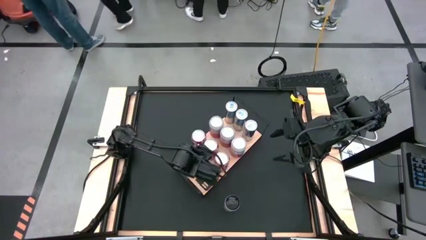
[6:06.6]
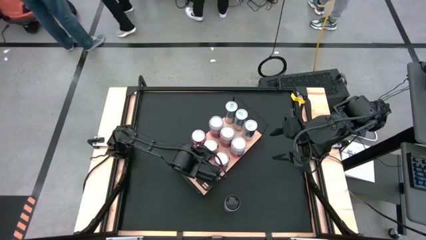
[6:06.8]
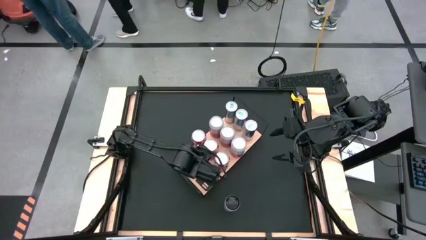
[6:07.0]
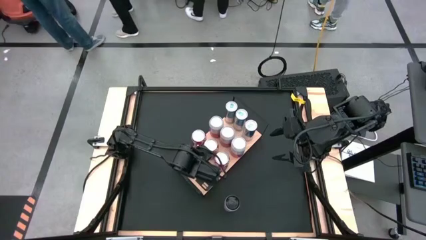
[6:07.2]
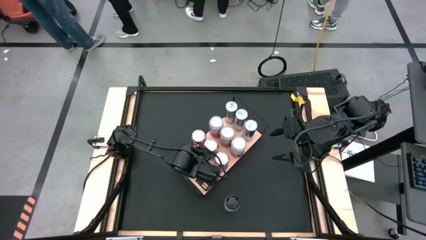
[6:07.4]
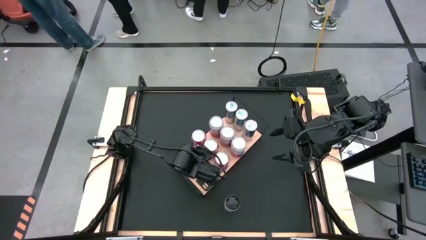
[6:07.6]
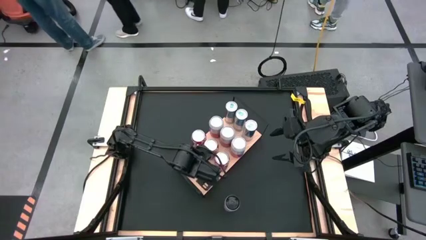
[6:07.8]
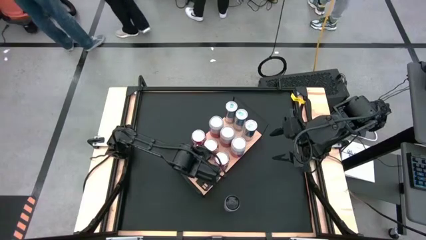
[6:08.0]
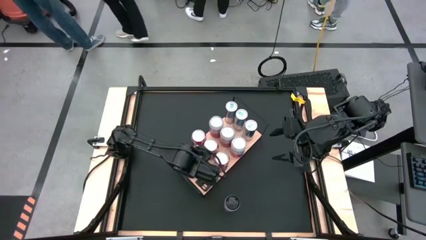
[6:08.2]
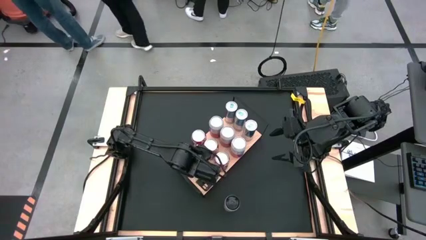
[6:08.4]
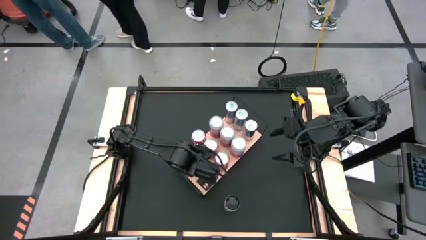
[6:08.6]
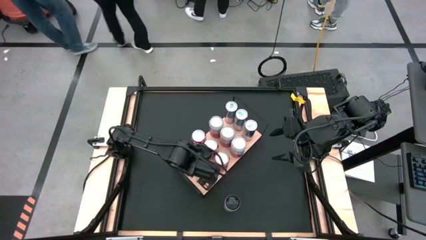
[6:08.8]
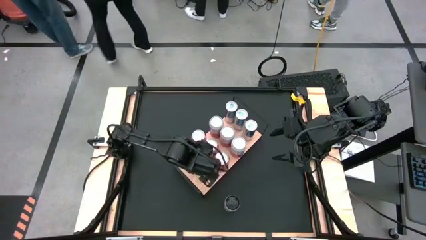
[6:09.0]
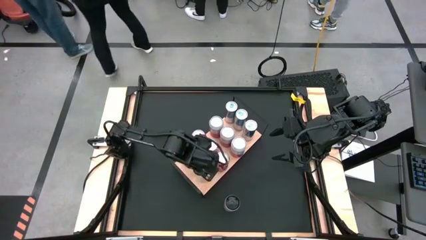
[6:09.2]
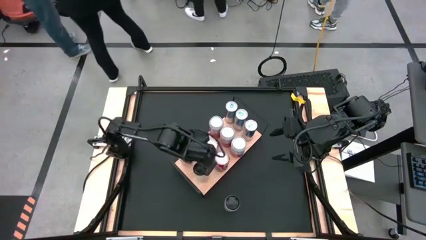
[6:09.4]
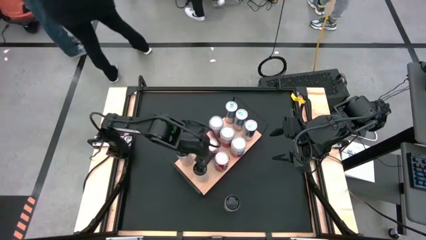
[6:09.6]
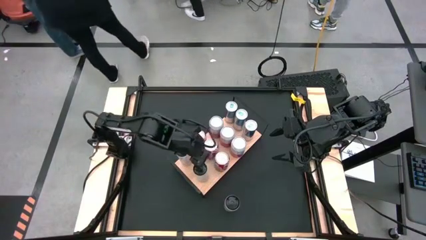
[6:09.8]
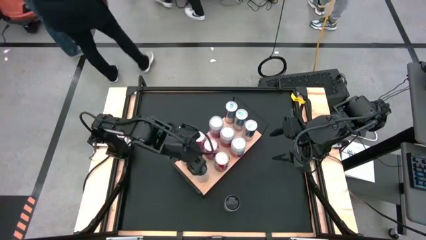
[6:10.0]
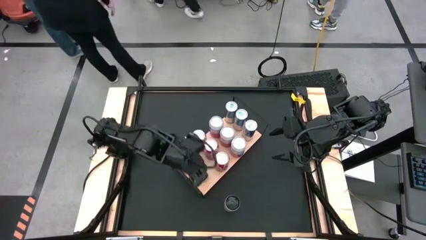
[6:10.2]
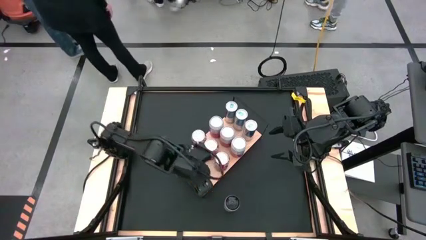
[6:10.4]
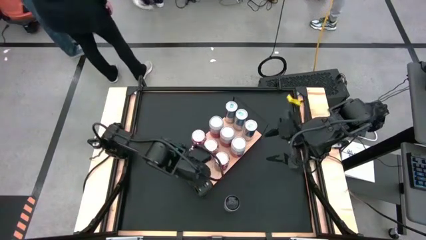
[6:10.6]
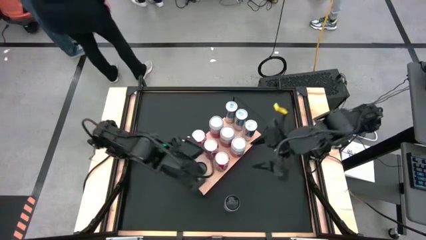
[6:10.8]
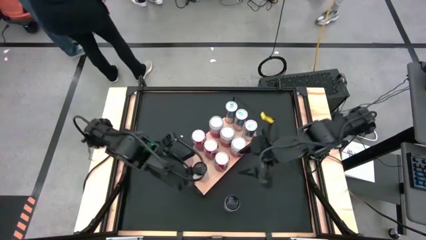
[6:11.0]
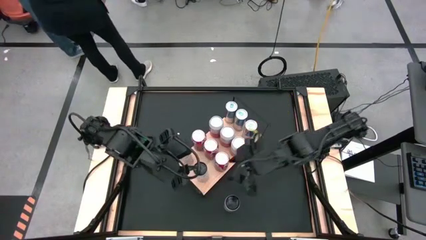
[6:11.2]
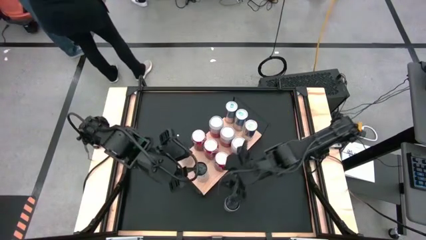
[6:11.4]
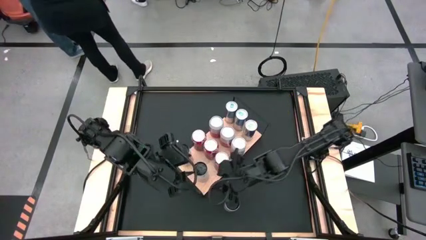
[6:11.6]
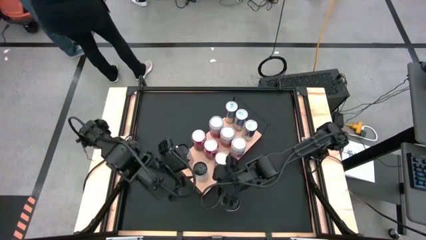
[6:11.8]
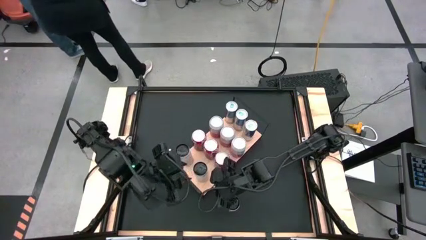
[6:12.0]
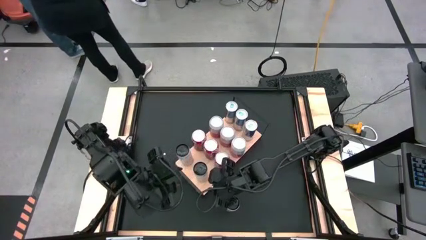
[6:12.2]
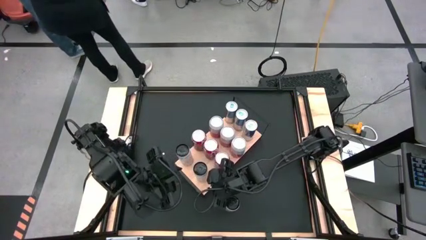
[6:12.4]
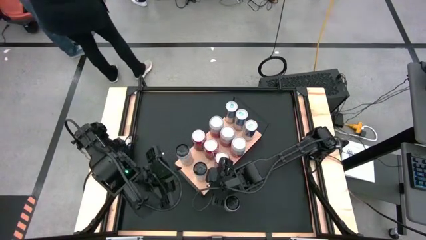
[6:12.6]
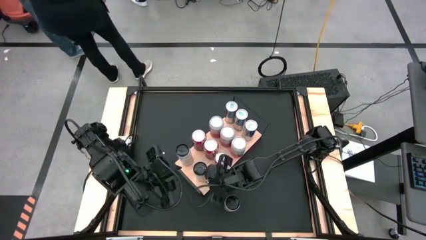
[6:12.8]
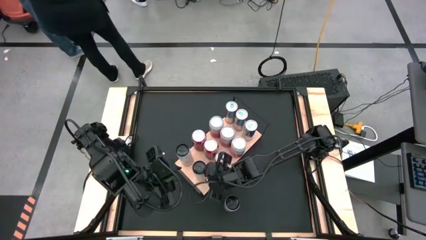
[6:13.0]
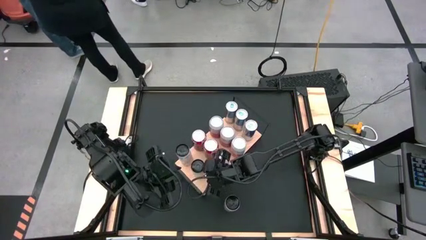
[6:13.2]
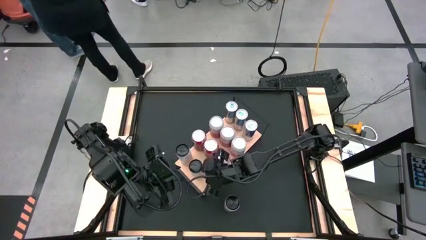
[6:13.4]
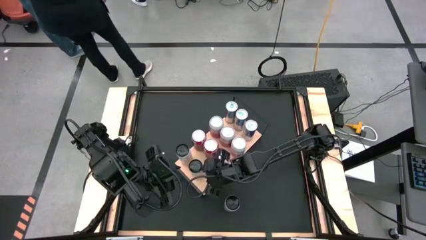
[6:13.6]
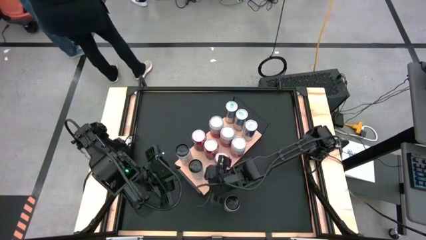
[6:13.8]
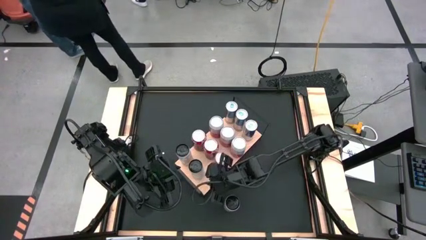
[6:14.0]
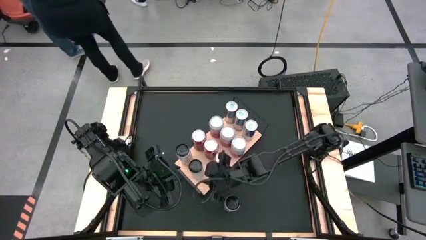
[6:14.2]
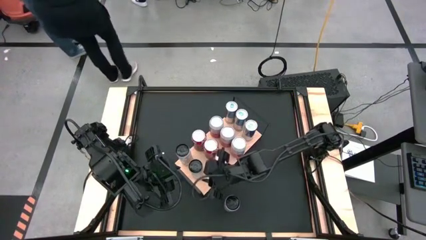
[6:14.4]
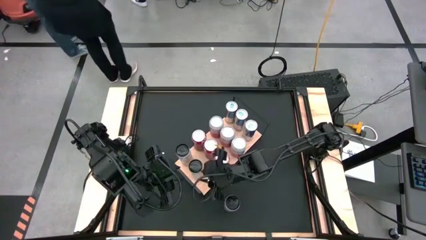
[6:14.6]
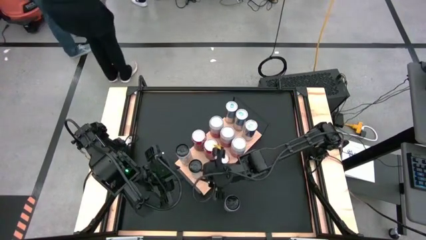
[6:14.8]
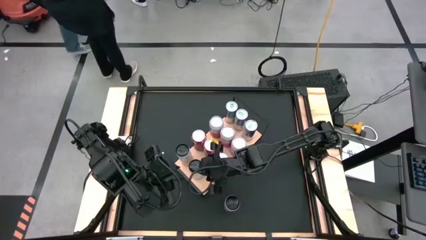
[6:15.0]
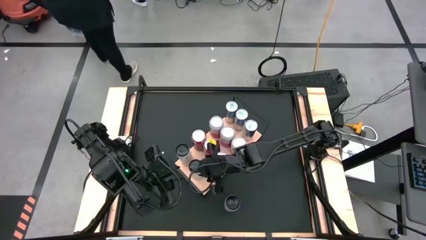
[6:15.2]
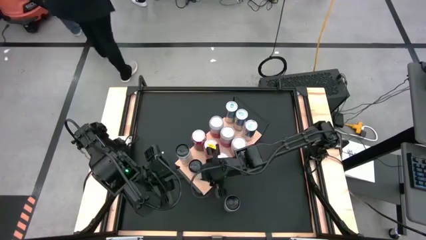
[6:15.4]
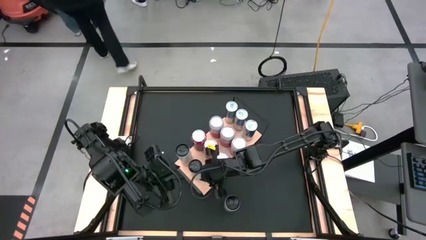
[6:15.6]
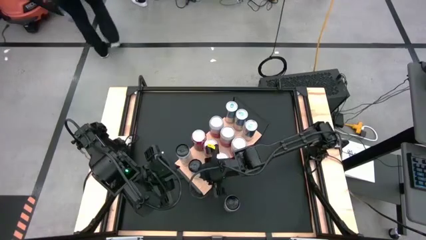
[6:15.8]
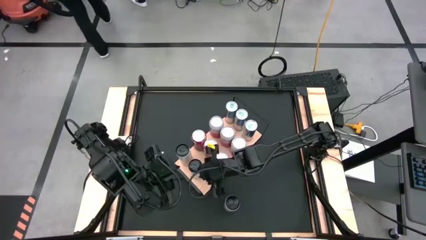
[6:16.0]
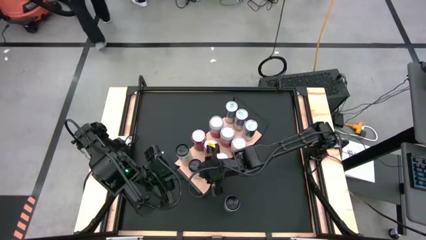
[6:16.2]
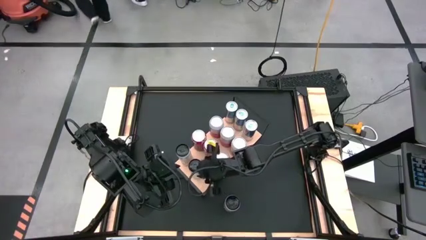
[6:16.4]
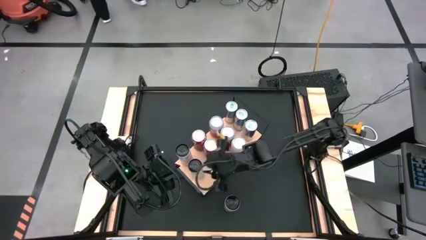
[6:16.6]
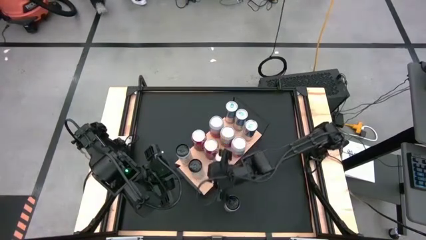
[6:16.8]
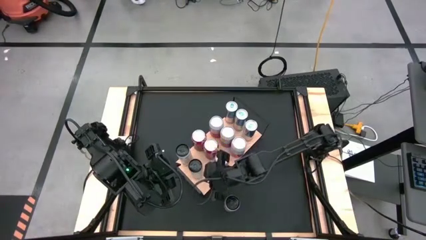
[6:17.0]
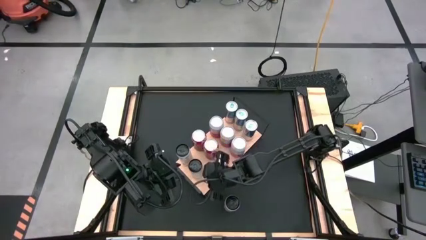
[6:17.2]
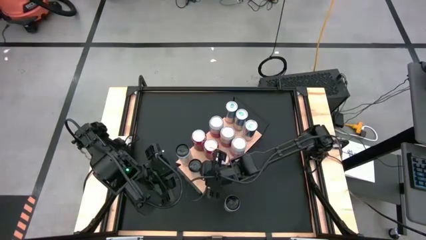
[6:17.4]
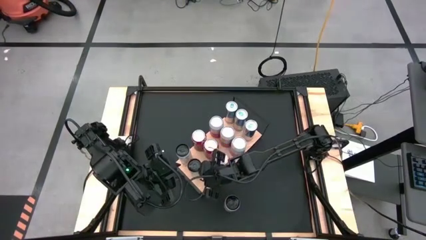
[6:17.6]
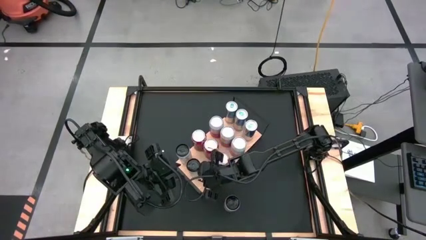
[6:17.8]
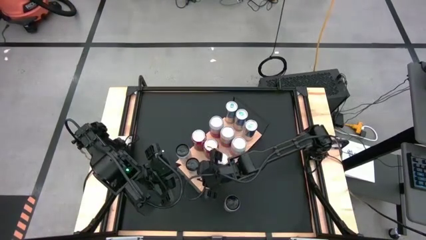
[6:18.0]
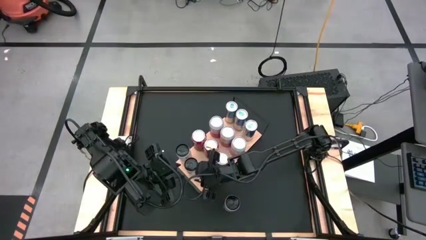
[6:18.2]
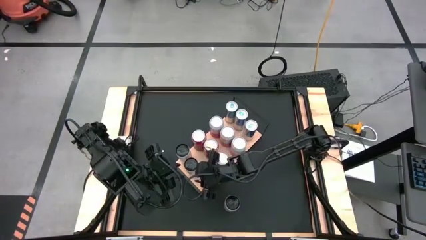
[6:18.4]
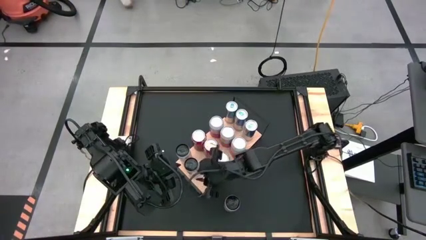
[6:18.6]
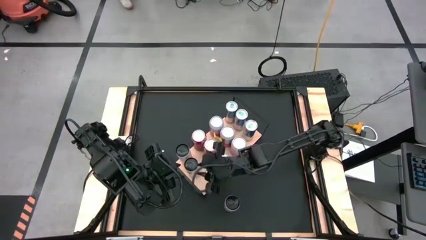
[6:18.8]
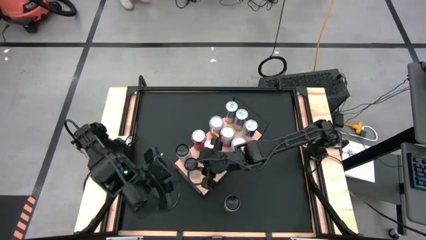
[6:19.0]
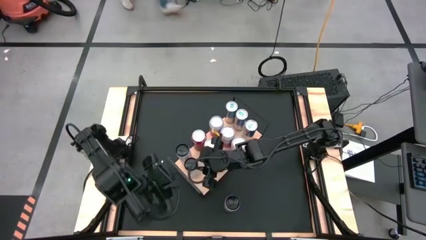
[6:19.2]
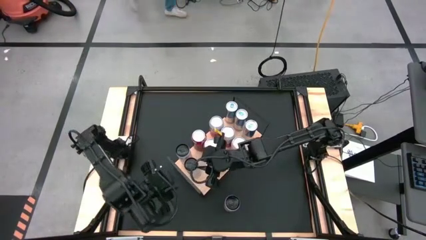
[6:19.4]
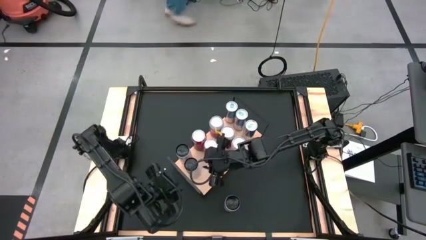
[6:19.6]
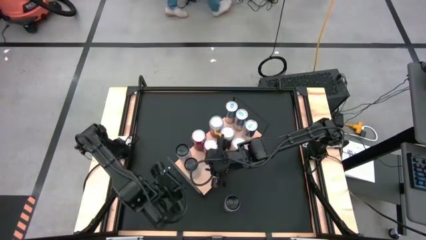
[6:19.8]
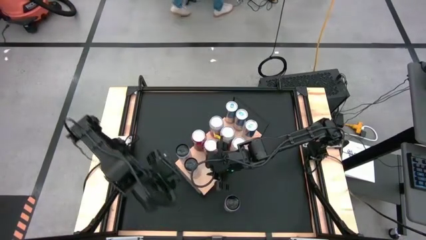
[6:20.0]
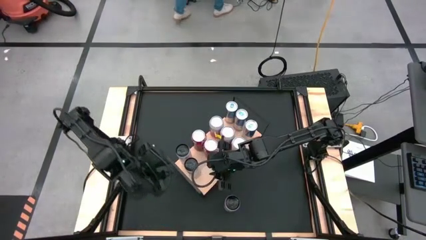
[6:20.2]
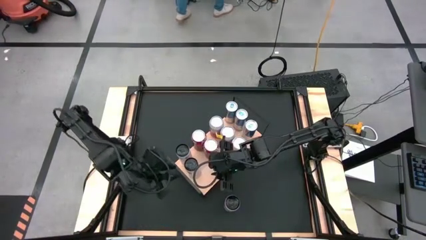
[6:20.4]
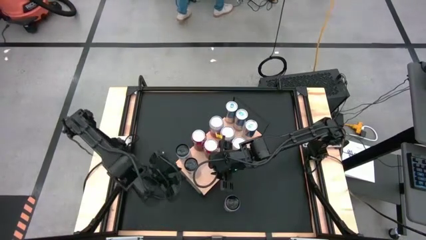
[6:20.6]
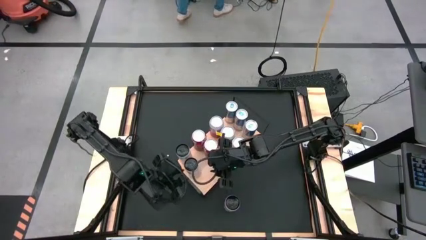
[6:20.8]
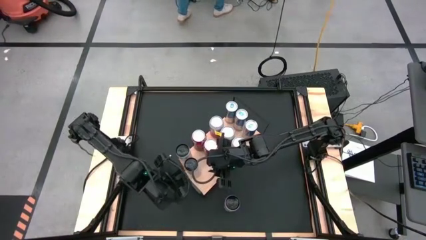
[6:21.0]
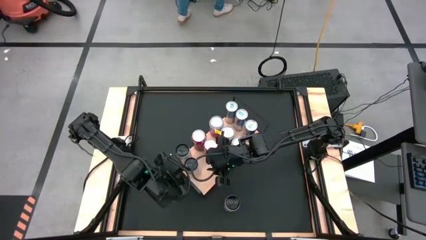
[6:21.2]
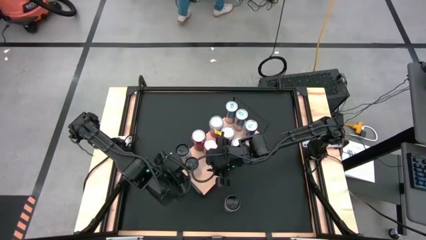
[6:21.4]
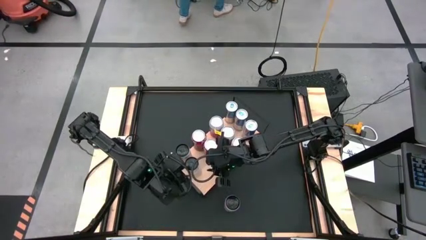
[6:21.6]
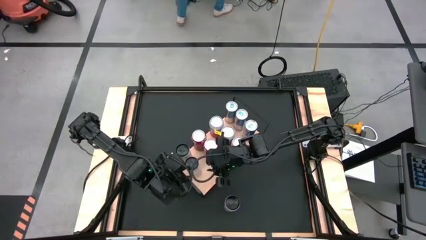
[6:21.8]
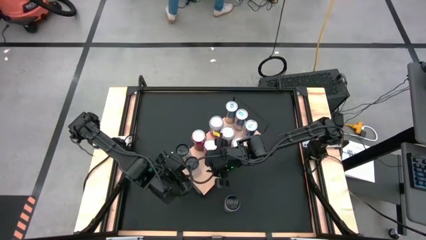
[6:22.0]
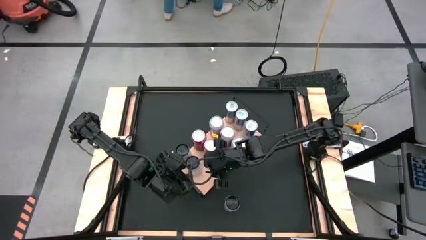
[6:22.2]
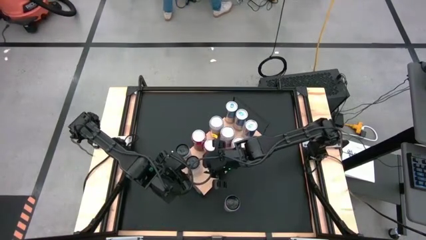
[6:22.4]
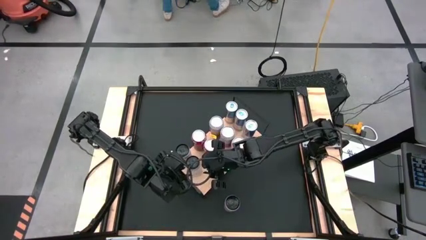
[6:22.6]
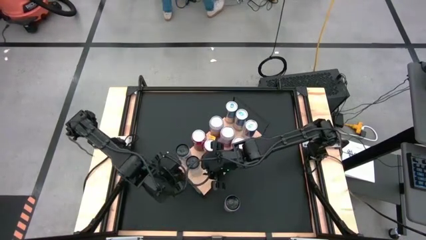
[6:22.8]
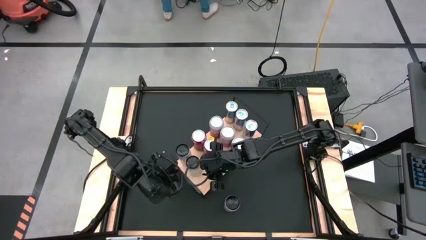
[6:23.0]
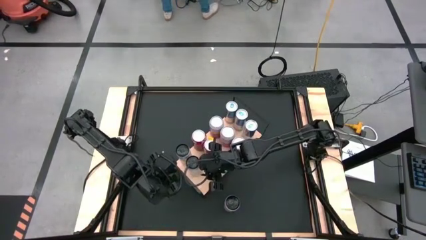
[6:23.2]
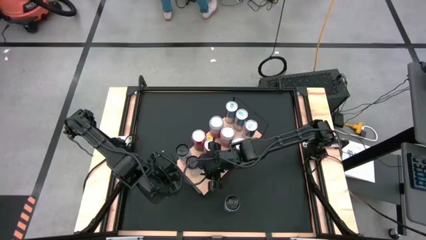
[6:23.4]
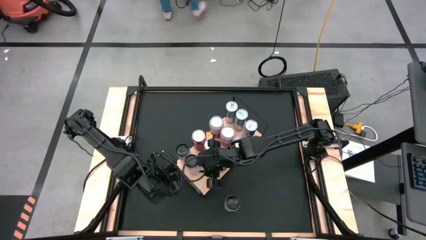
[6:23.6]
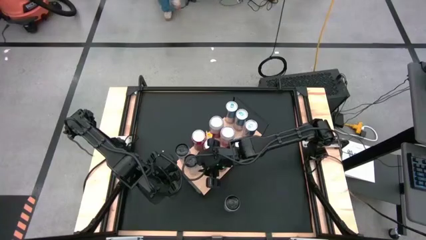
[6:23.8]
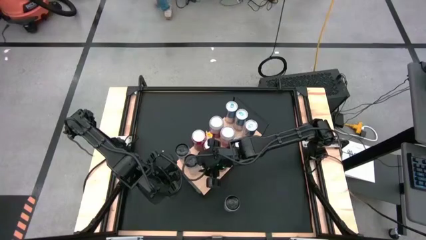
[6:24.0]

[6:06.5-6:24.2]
Task: Place canned beverage on shelf
Put the right white pink soda can on the shelf aligned with the other white pink soda can
